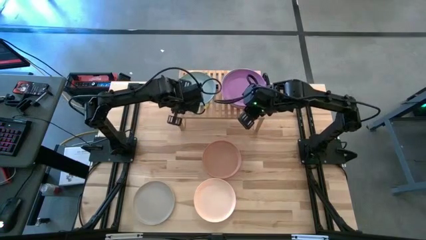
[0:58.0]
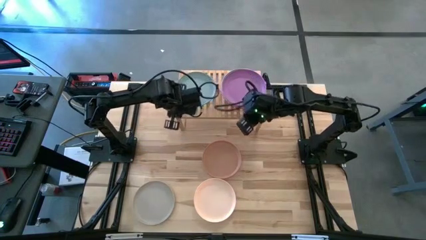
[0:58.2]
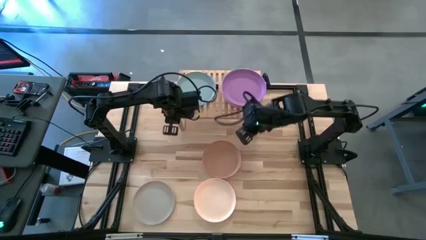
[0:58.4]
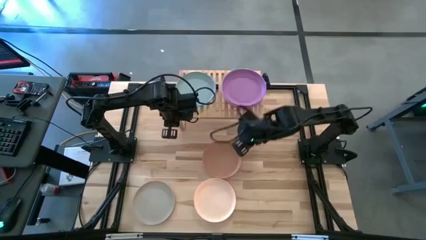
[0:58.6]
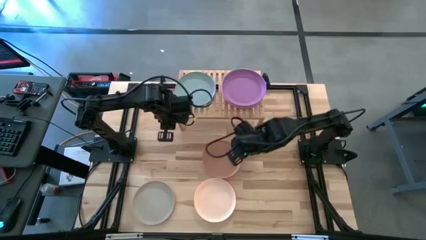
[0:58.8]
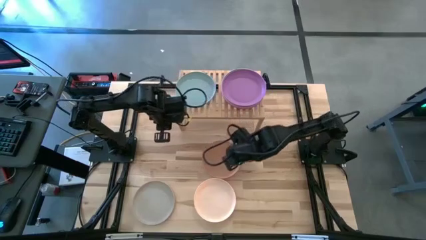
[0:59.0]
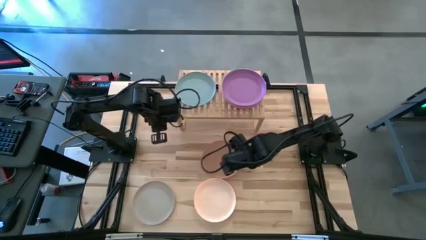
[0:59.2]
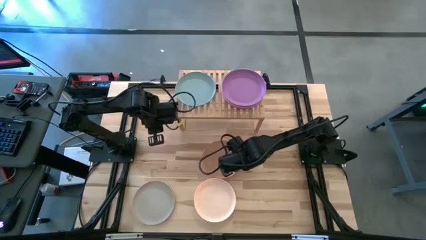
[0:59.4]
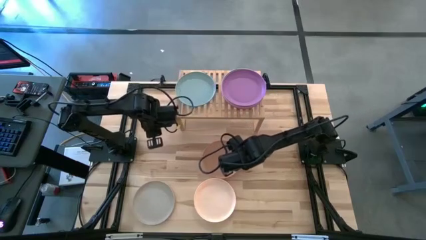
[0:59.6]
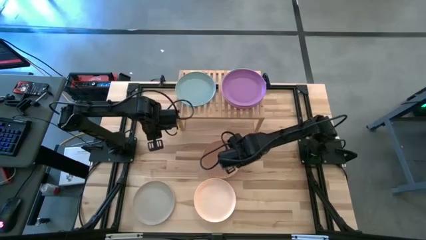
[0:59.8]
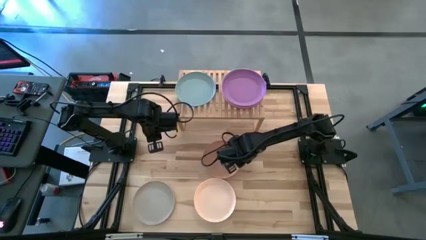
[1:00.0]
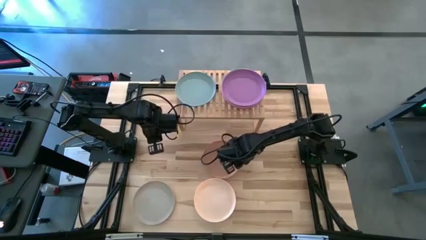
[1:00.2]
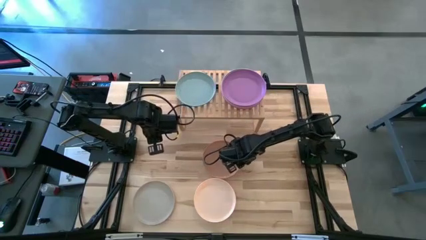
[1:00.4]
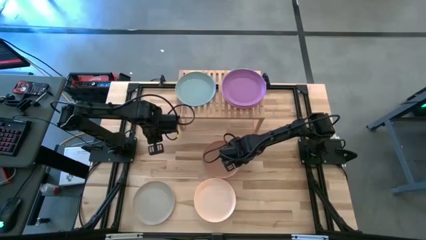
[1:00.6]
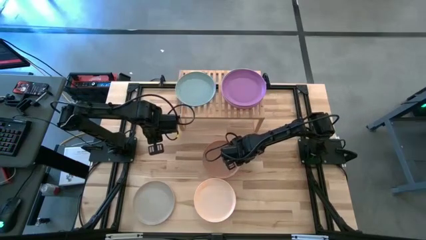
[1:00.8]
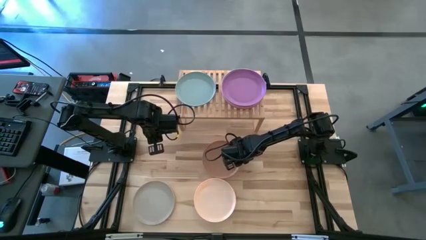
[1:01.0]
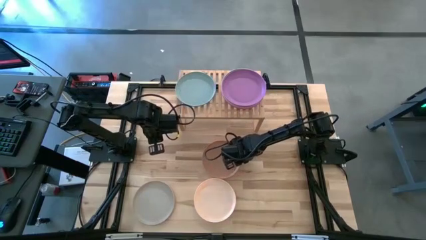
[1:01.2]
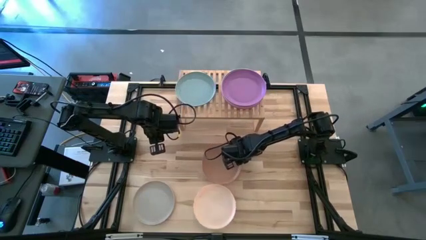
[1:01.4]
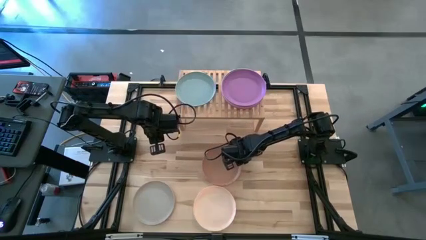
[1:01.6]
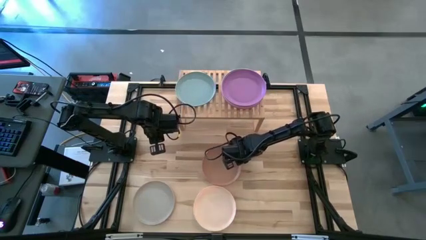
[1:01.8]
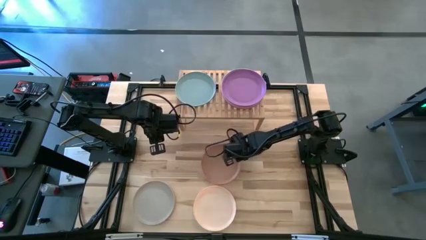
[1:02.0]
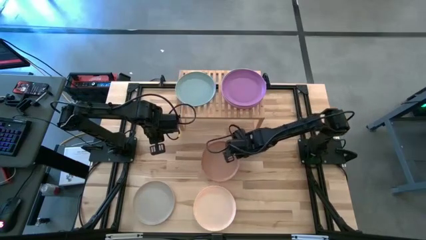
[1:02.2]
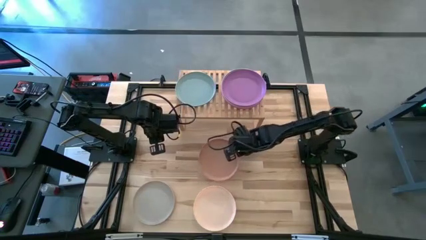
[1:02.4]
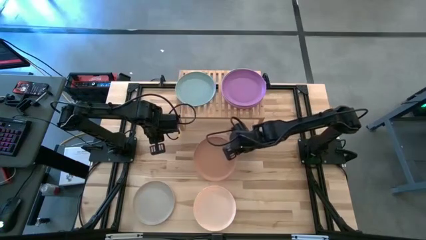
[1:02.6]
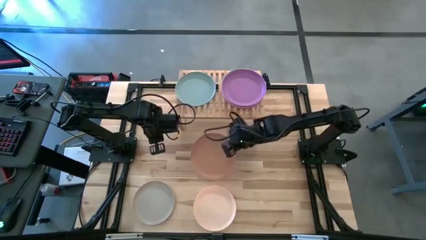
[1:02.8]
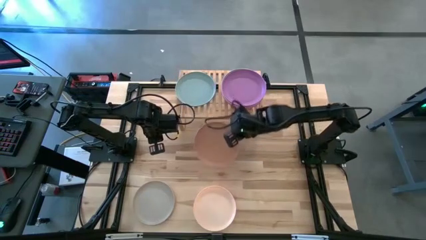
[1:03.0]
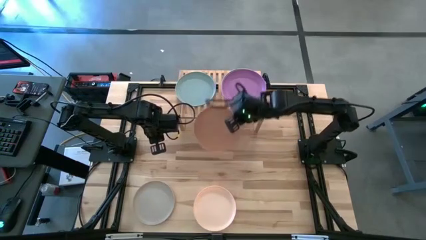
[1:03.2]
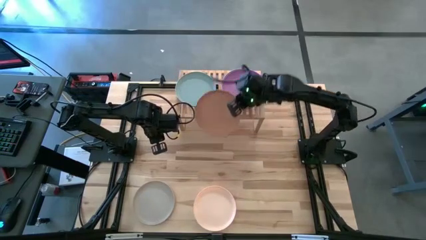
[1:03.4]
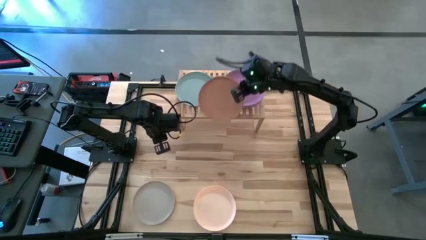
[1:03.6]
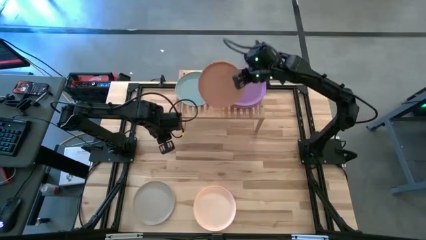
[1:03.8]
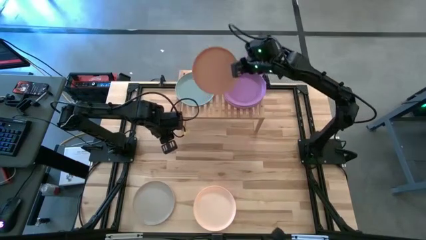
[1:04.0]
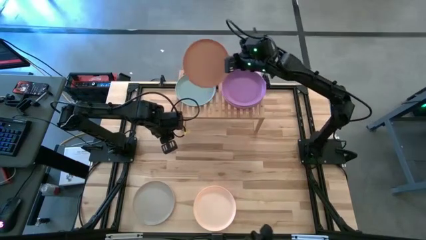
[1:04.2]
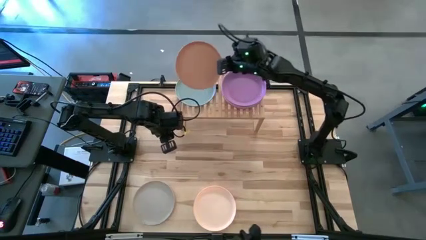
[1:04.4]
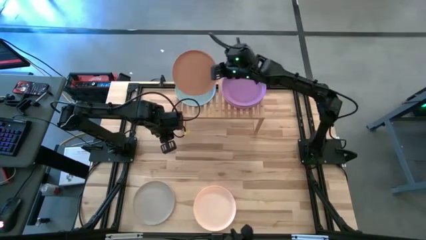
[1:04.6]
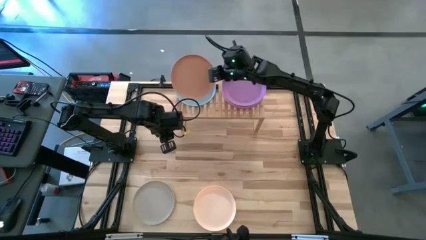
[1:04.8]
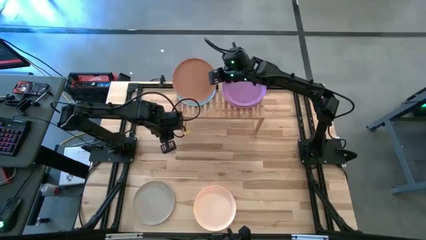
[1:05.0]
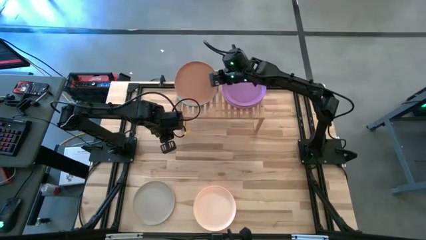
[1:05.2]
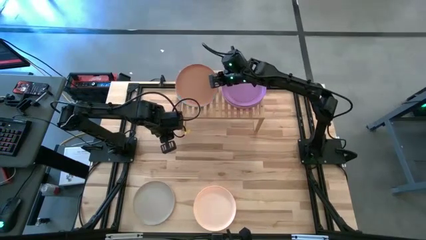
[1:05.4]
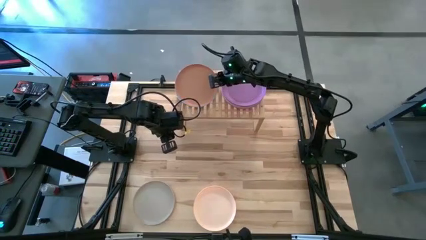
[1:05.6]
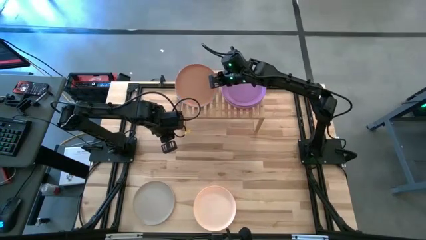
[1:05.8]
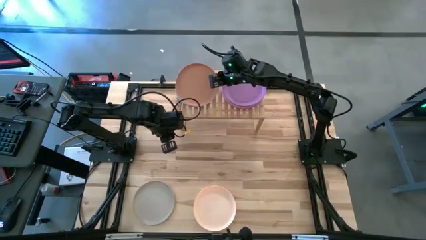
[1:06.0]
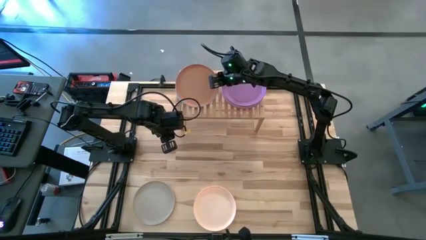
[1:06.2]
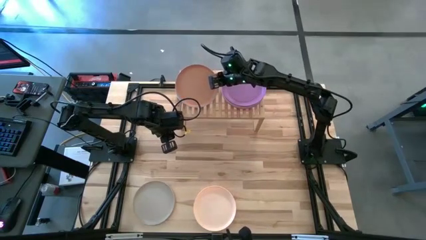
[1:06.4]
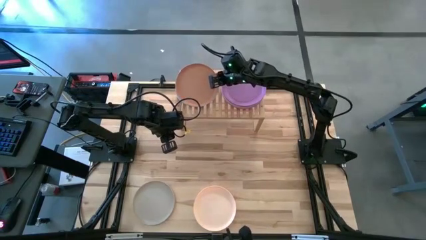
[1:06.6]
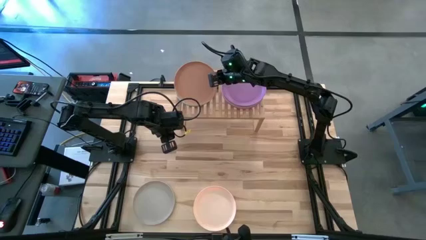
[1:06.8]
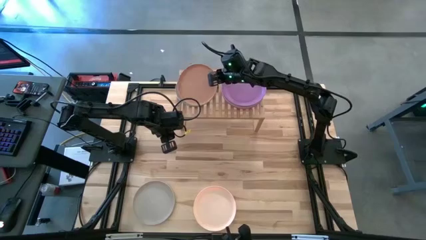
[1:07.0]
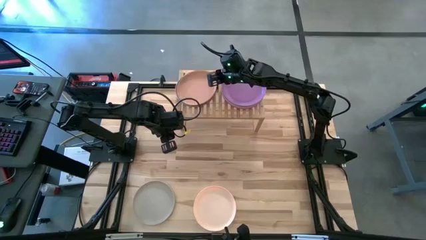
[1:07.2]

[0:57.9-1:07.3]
Task: Place and stack plates onto a shelf
Stack the brown plate on top of the blue plate on the shelf

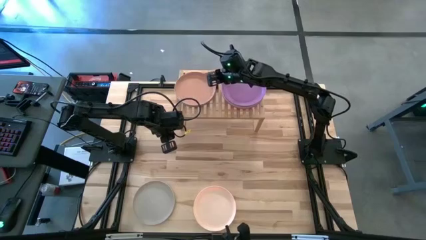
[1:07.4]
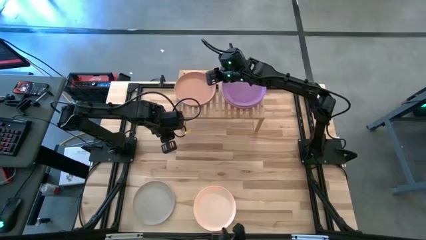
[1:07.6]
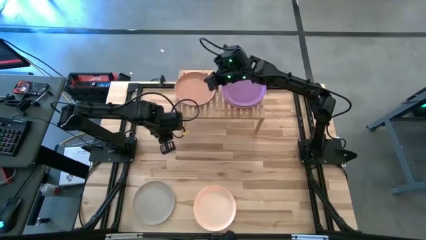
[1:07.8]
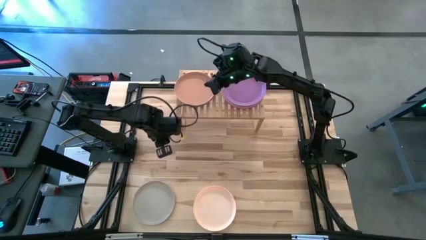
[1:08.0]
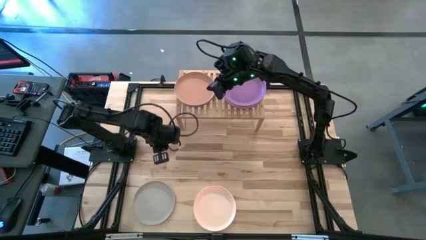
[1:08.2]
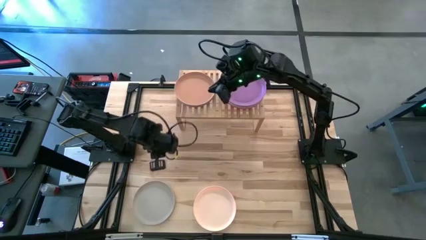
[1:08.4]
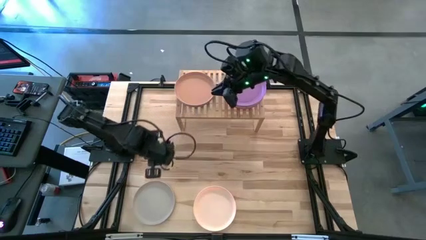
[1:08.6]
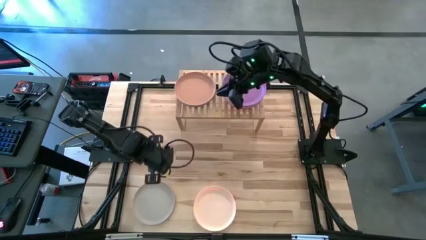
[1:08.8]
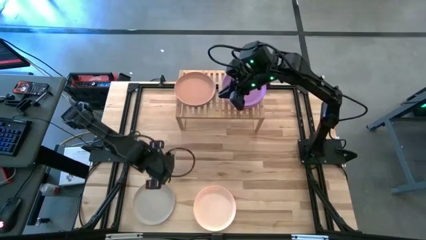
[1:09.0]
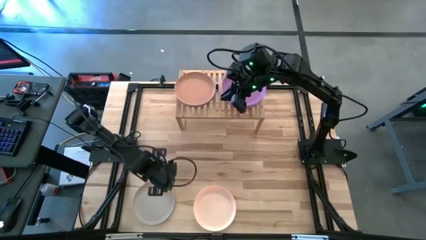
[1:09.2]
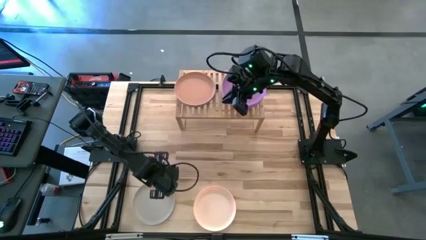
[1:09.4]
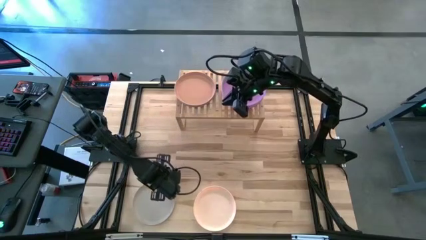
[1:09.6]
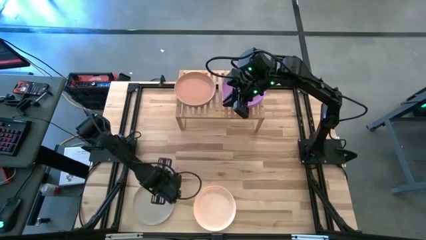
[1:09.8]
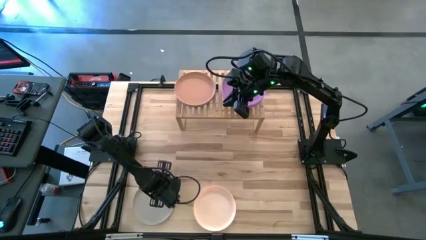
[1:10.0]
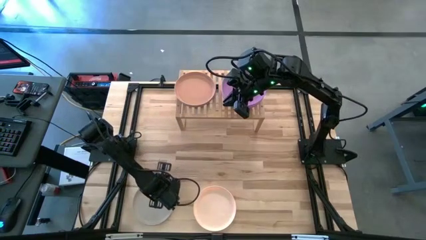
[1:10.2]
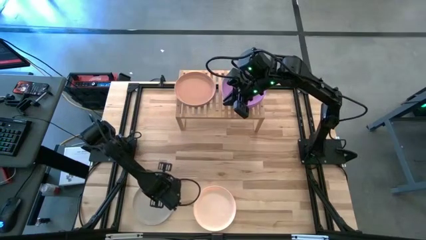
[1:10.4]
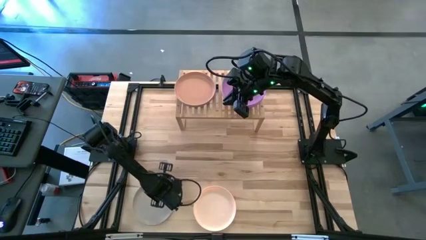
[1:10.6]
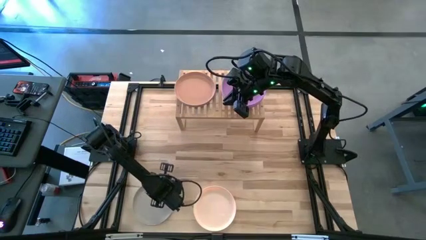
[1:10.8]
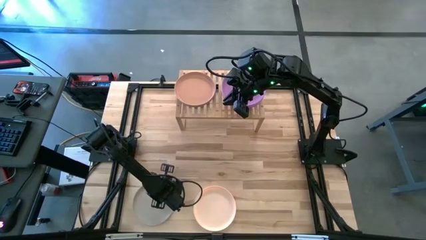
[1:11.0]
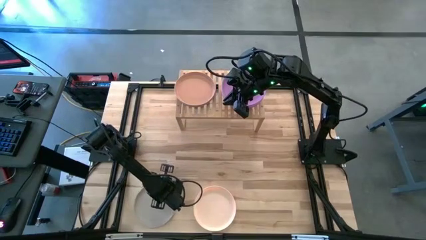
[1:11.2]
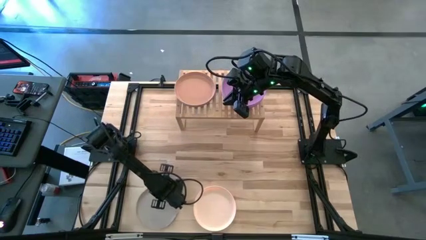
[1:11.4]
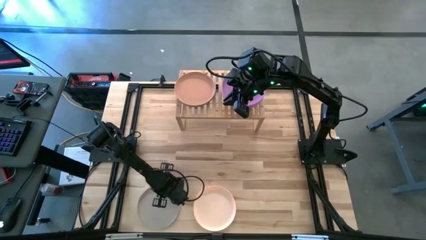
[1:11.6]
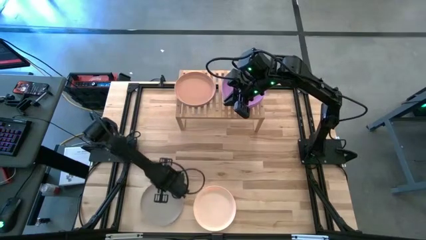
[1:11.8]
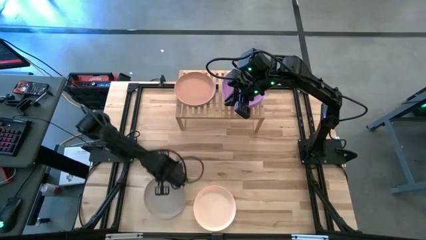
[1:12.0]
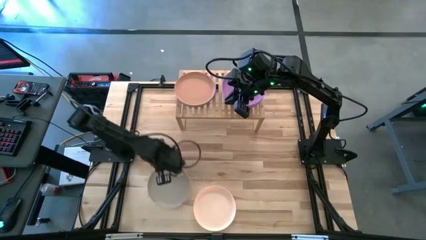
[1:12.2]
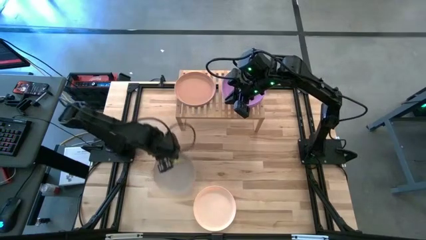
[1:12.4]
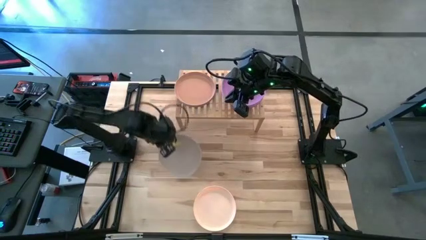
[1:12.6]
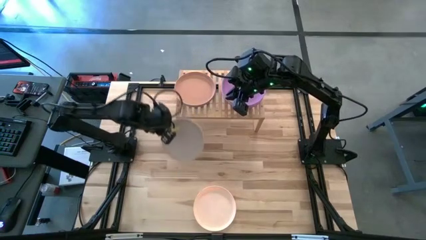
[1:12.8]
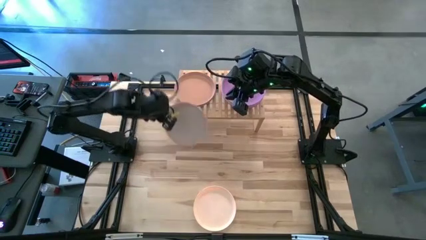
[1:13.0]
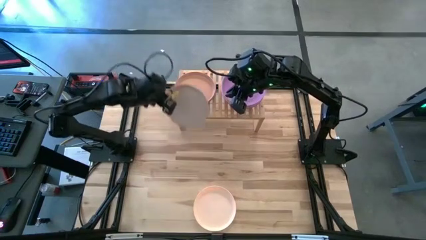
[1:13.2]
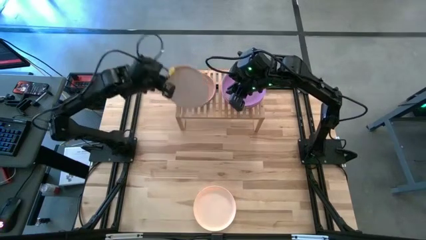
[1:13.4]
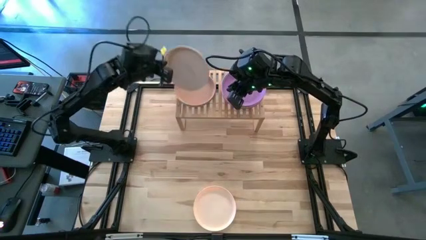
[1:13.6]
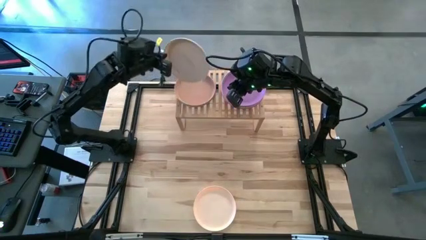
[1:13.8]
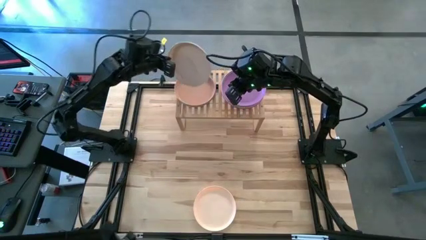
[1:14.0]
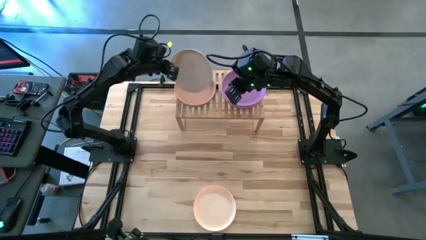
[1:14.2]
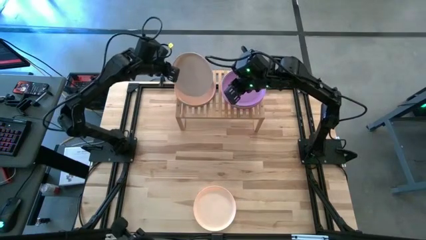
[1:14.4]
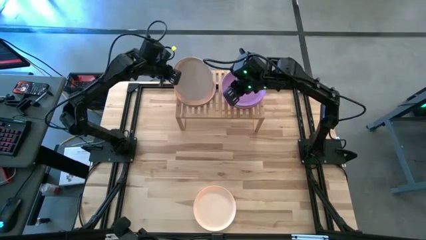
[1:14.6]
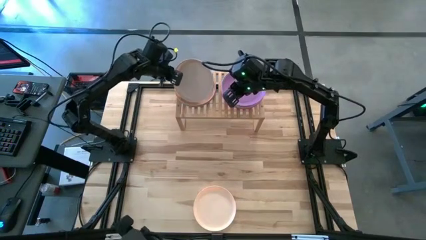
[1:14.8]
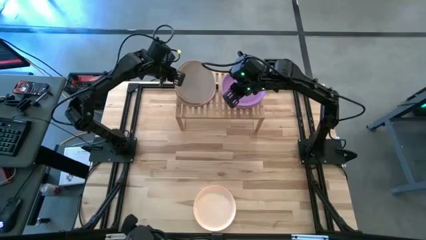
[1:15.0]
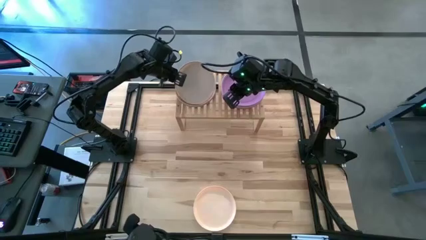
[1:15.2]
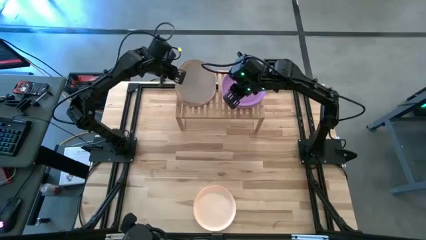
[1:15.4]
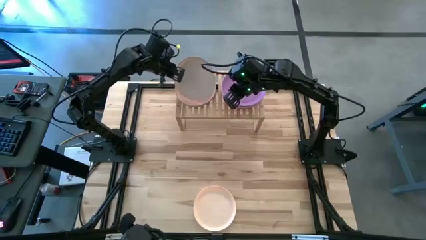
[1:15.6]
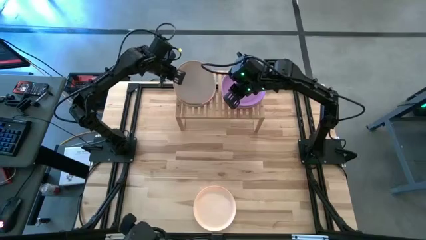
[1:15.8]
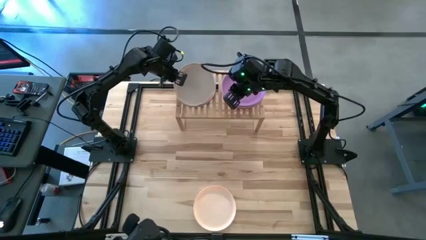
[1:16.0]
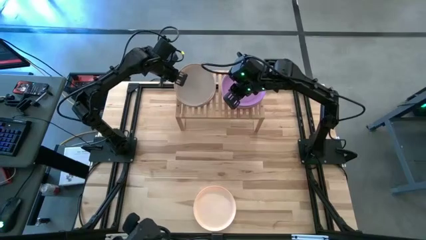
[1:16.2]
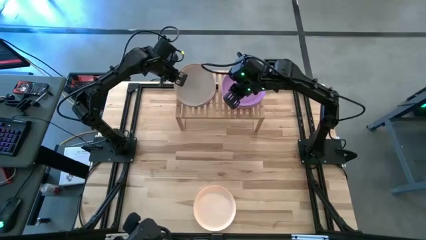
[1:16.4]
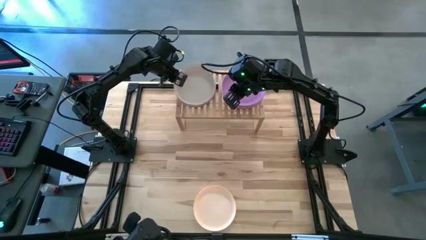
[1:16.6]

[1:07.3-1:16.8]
Stack the gray plate on top of the brown plate on the shelf
